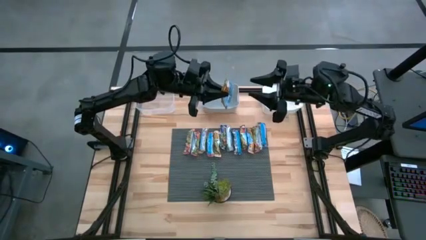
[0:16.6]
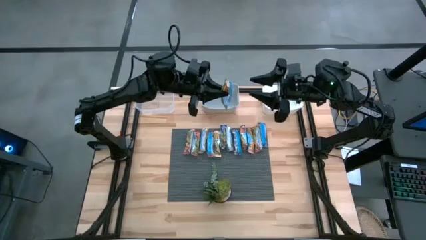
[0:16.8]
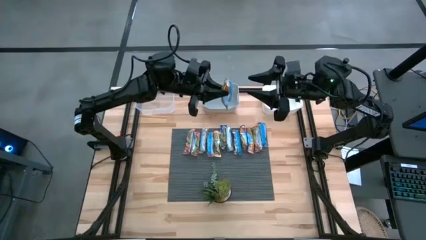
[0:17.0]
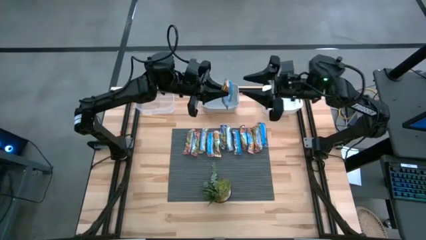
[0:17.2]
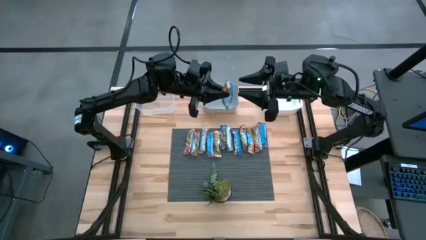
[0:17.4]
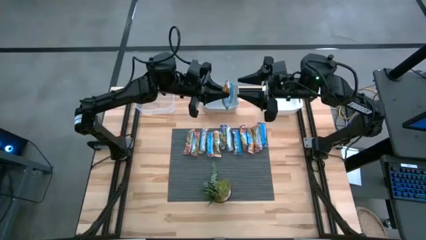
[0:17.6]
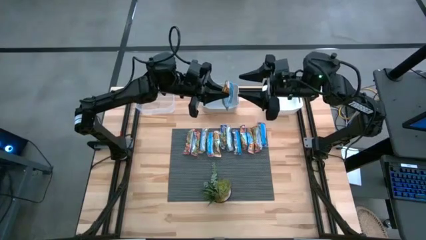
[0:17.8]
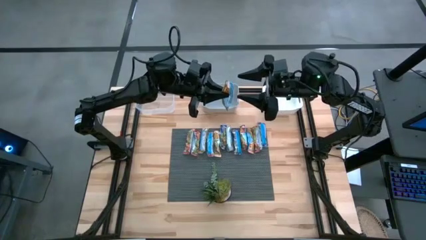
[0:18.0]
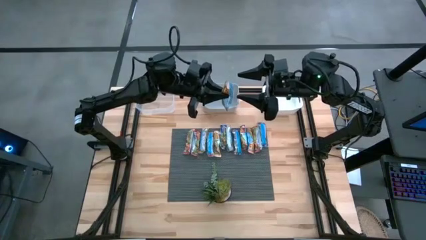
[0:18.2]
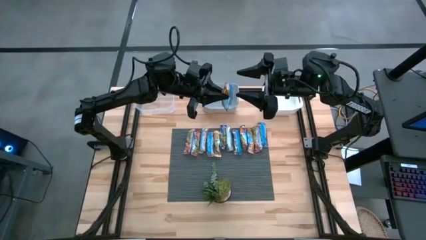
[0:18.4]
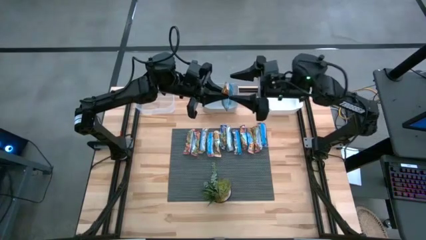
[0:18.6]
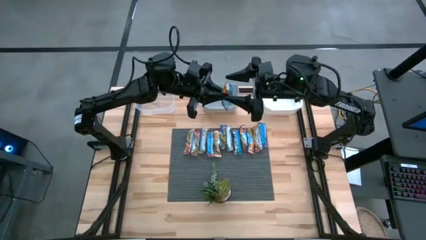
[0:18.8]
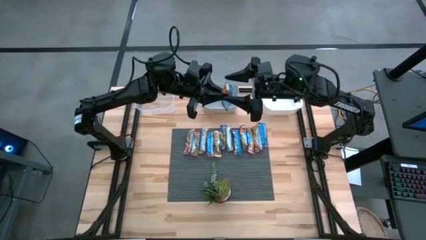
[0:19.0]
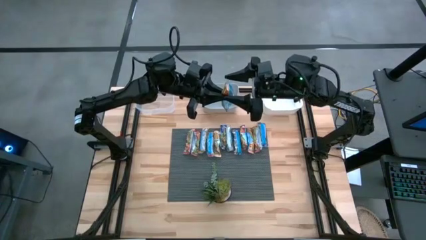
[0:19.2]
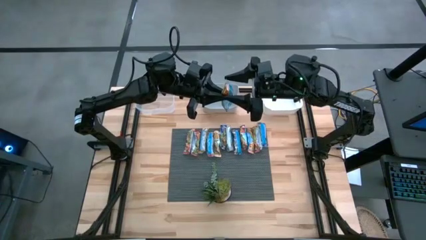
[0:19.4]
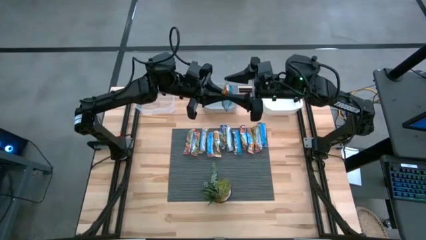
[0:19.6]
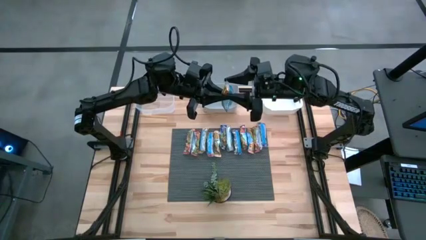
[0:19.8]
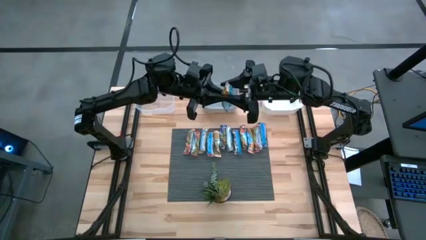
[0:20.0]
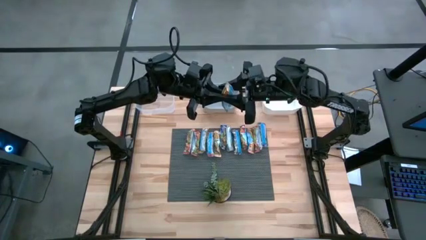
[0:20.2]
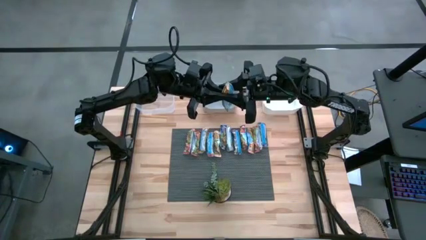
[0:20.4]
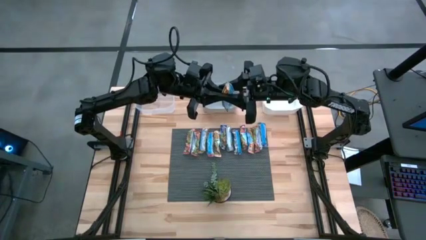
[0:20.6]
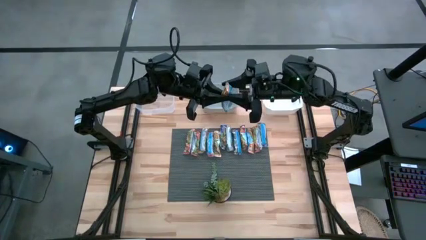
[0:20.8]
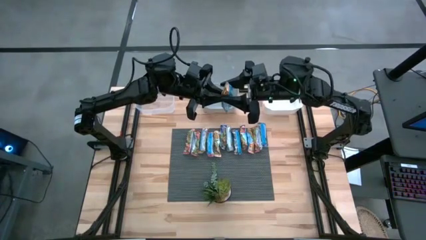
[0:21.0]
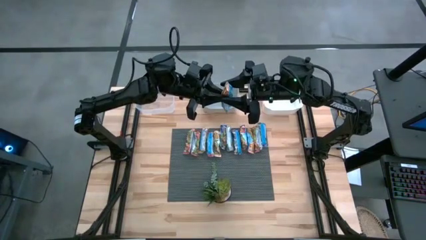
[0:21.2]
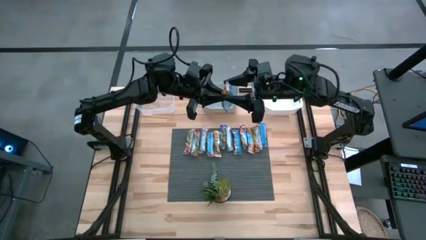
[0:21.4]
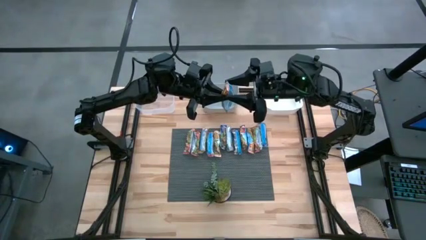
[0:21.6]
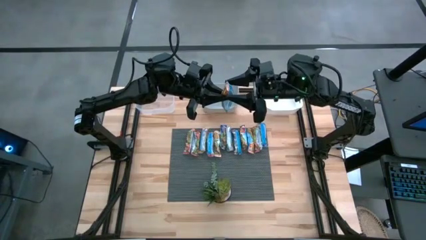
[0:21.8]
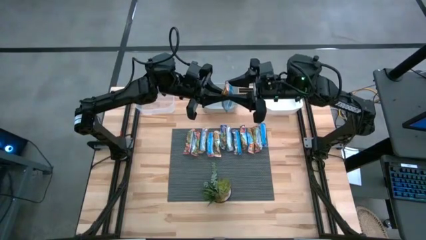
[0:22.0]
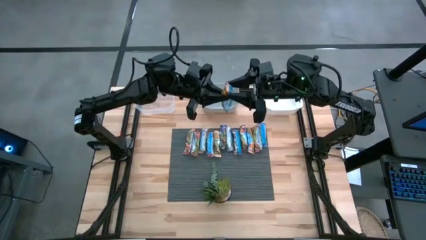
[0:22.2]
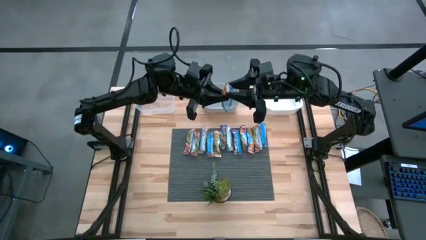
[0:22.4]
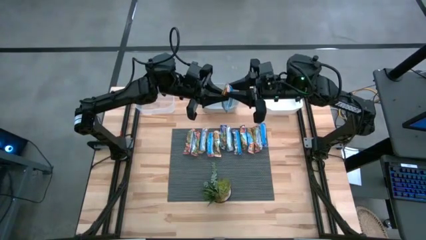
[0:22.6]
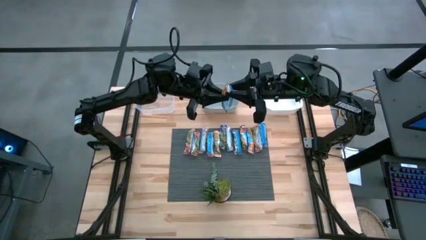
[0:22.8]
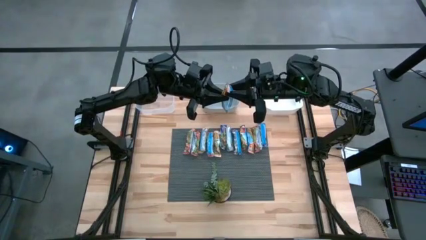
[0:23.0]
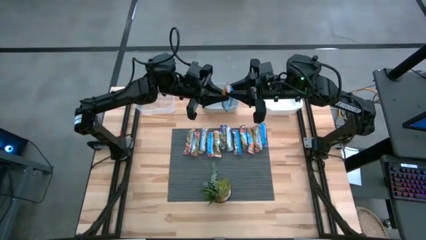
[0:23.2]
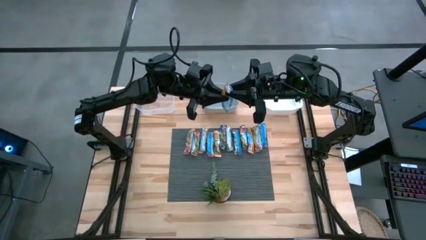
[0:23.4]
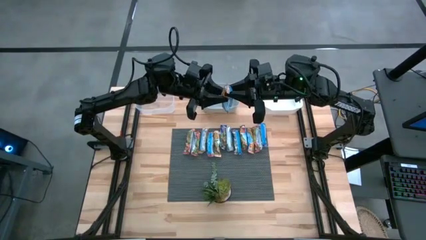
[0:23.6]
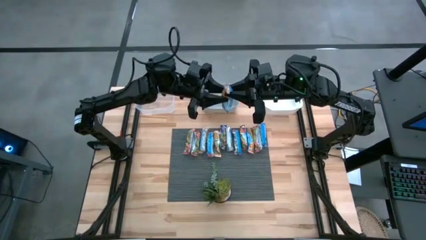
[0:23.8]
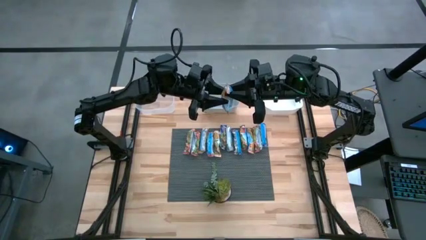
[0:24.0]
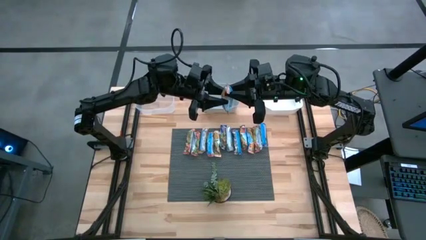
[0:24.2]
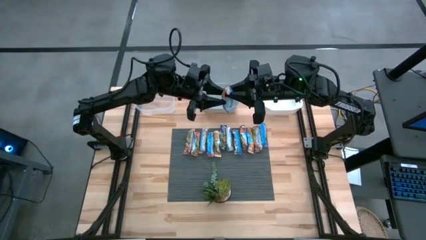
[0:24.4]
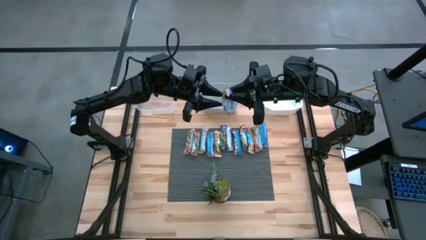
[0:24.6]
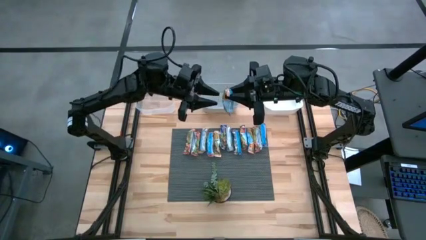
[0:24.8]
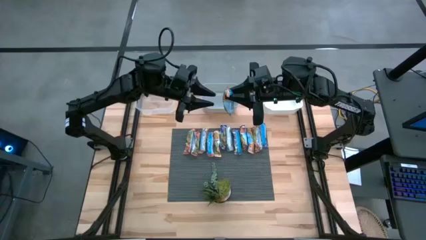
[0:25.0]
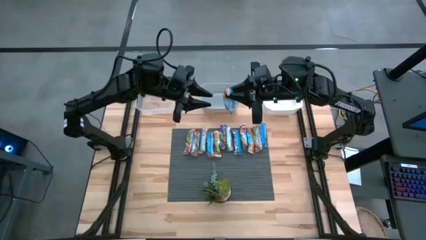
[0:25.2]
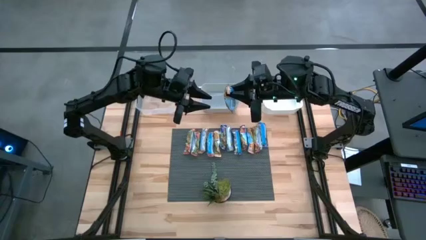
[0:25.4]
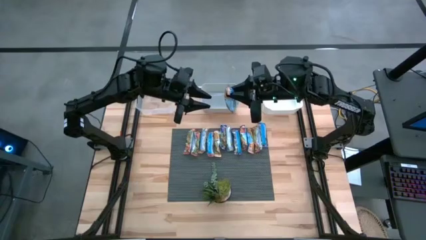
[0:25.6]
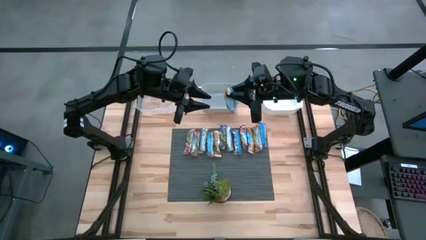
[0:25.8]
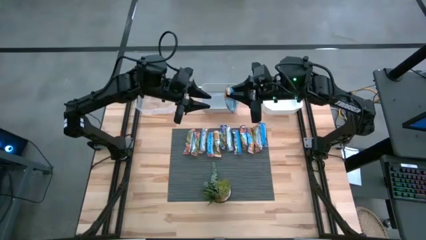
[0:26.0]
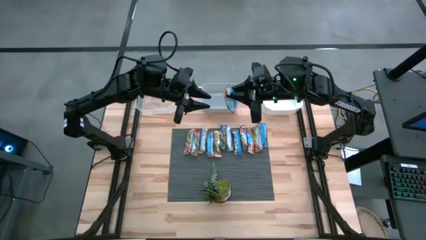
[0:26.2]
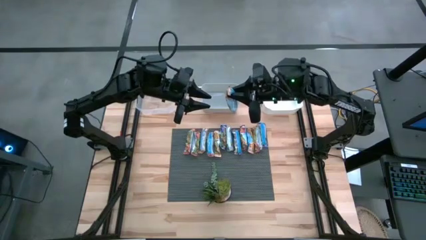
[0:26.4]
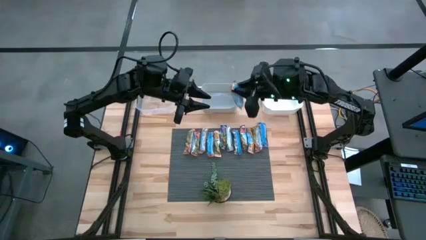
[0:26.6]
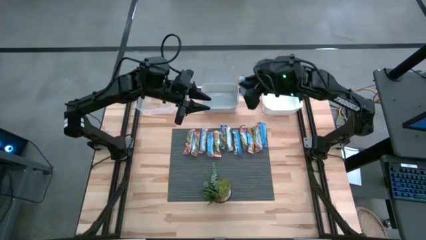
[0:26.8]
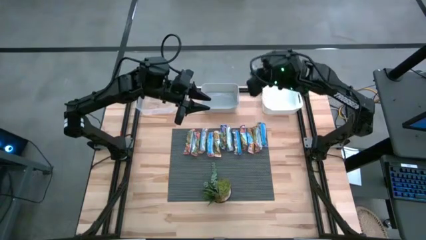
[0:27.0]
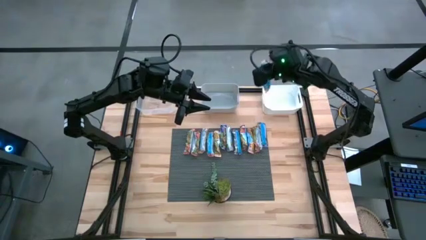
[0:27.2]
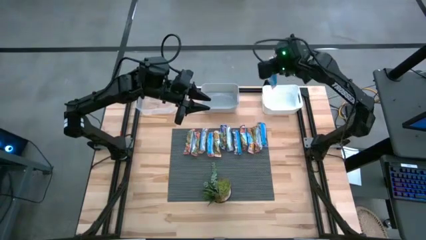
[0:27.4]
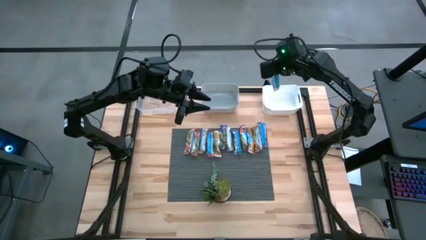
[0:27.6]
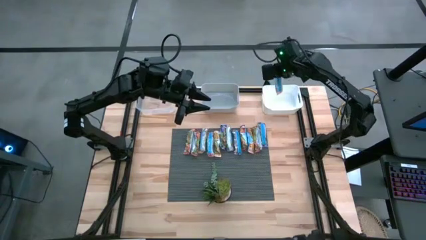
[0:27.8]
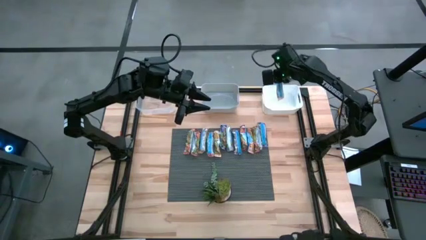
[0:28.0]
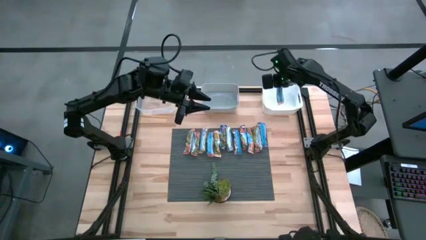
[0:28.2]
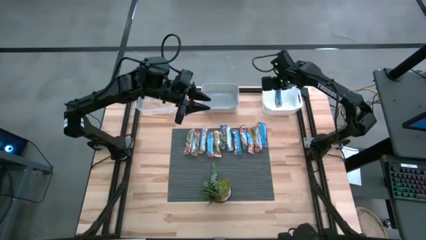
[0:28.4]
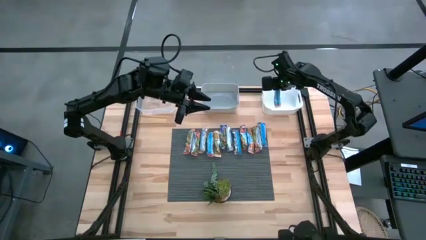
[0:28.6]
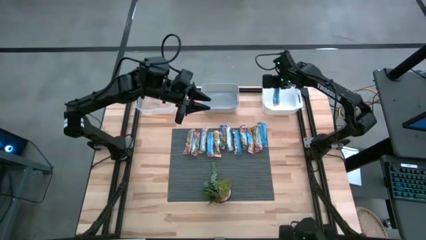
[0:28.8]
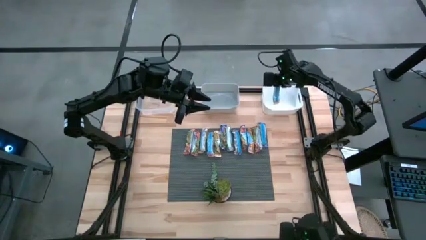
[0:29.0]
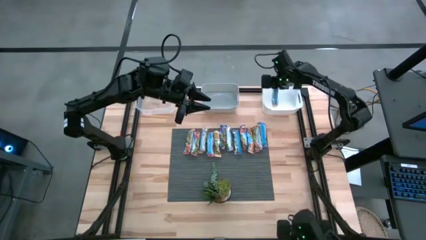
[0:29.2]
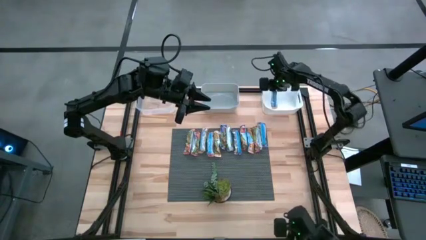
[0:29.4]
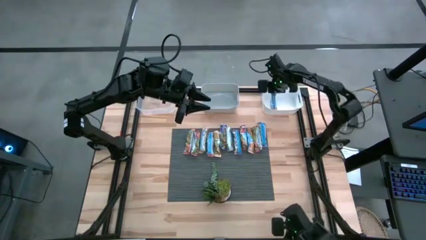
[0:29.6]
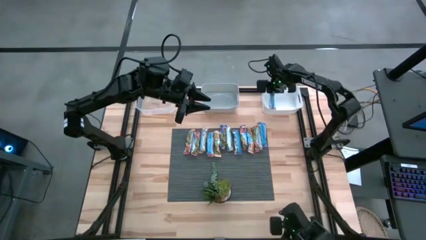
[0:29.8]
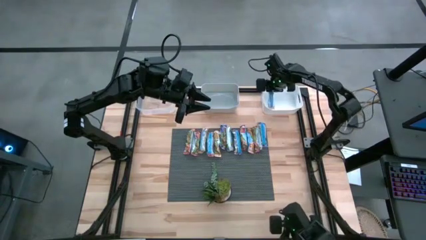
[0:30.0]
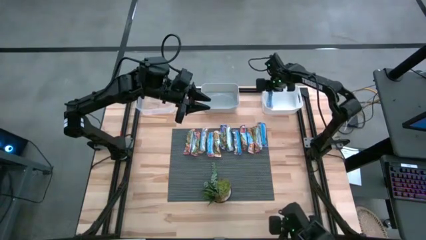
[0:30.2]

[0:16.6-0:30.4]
Task: Pick and place Granola Bars by type
Put the yellow granola bar into the white bin

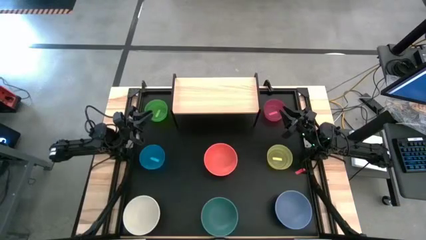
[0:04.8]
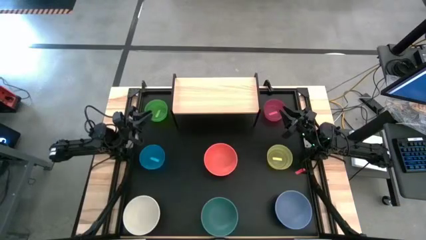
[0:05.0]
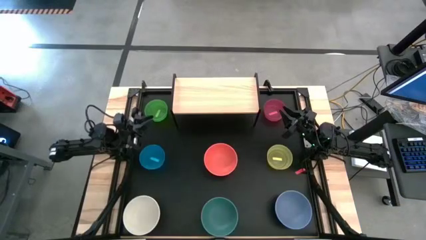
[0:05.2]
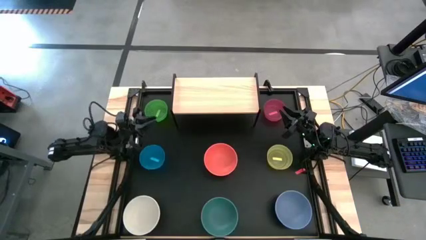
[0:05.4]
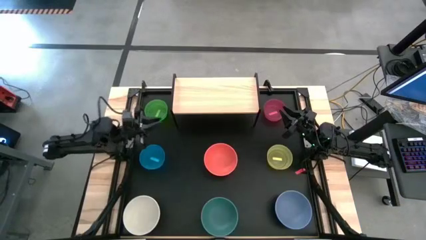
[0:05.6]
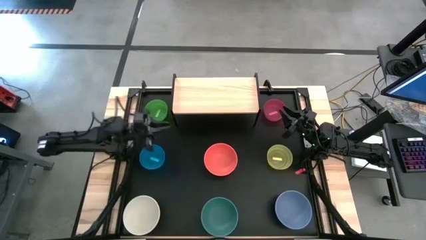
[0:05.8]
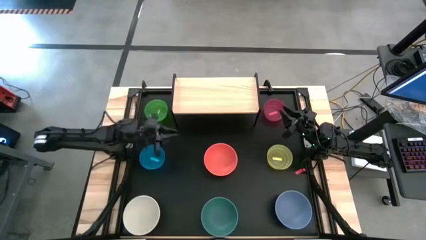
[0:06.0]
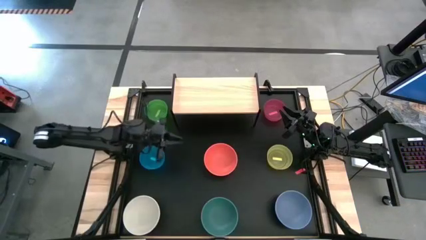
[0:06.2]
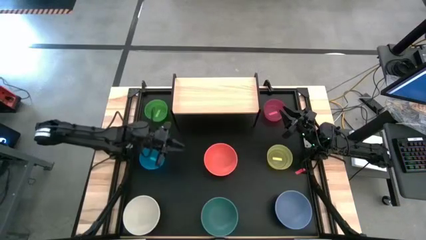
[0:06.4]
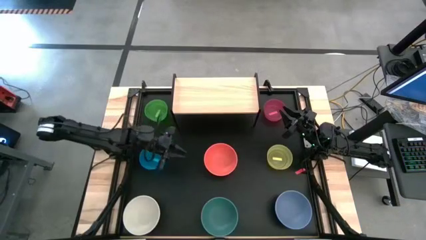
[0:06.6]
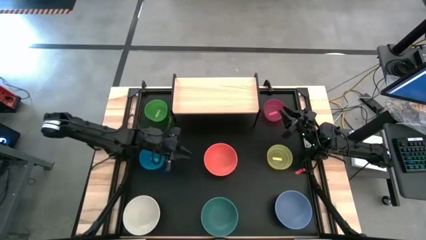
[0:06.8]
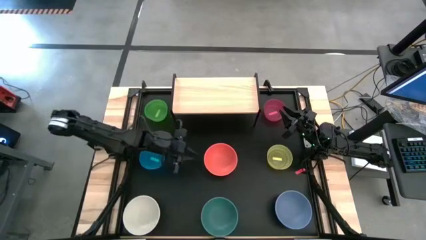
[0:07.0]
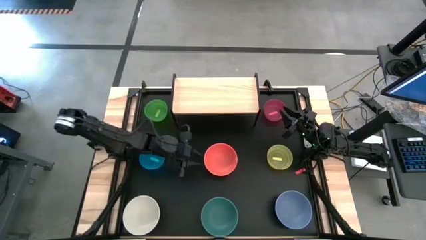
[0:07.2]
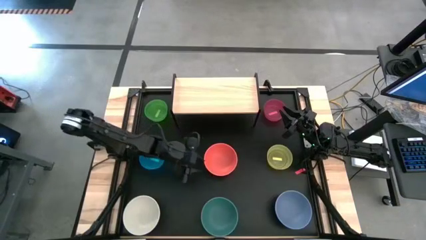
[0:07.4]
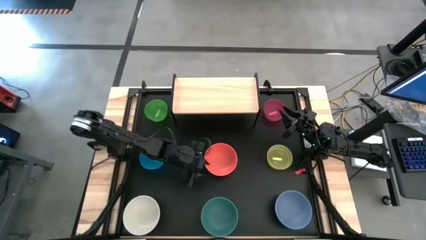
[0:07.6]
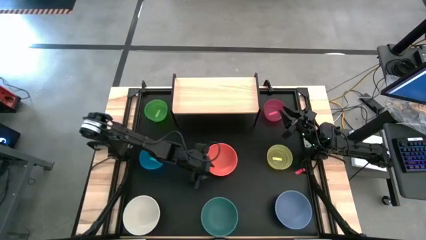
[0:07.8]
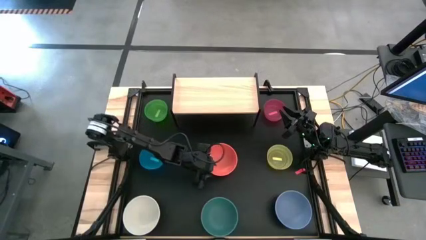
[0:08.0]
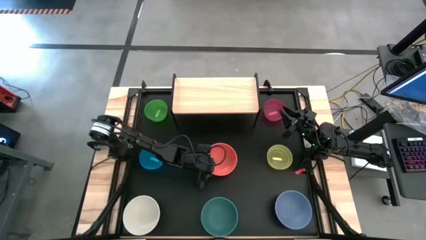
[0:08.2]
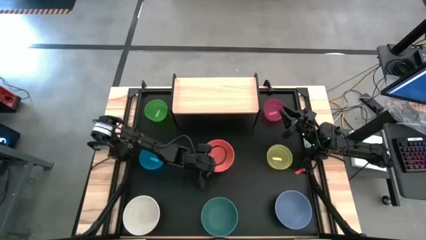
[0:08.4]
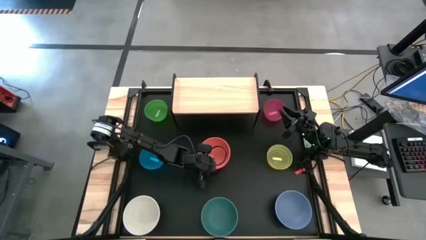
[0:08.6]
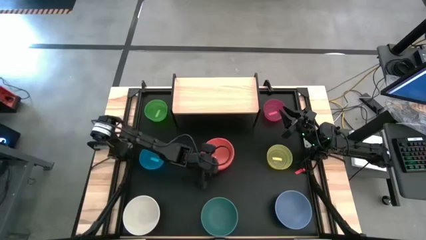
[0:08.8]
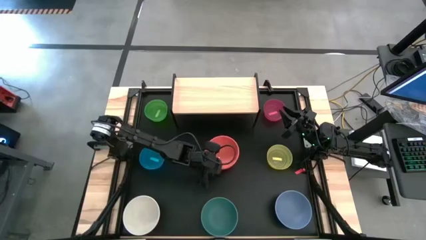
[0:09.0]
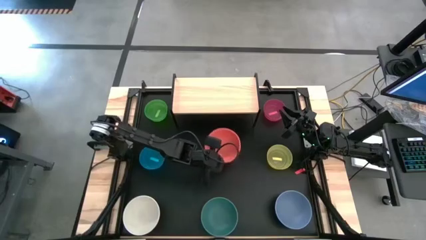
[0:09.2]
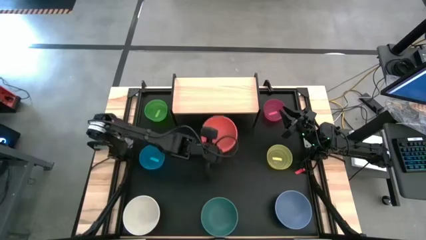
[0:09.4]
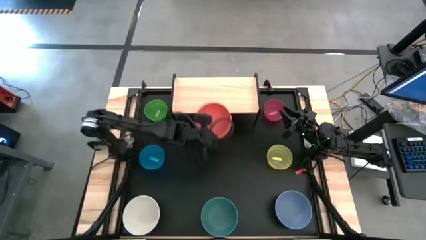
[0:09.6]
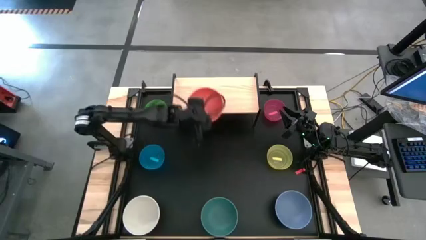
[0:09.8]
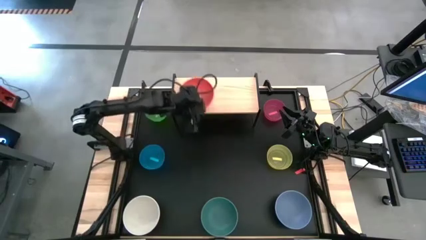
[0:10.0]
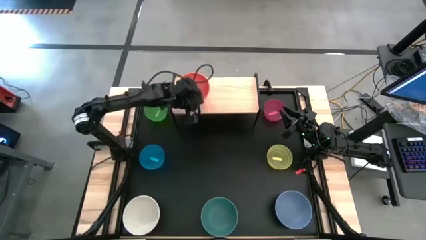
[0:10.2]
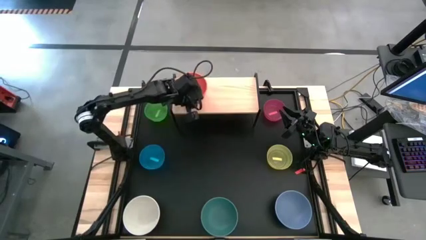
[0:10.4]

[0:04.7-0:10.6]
Task: Place and stack bowls onto a shelf
Put the orange bowl on the shelf
